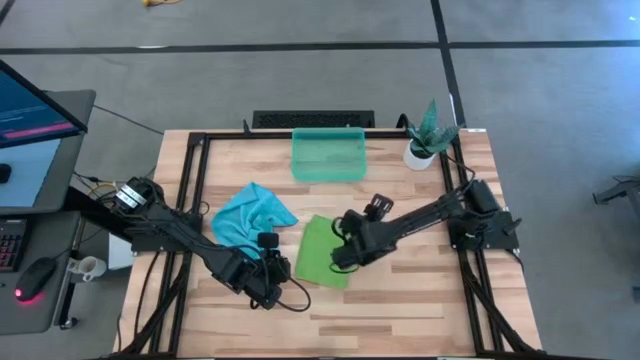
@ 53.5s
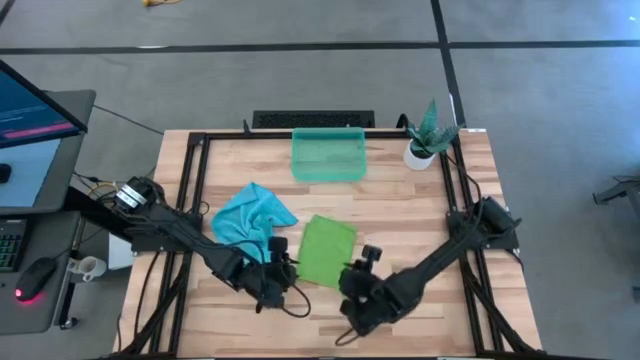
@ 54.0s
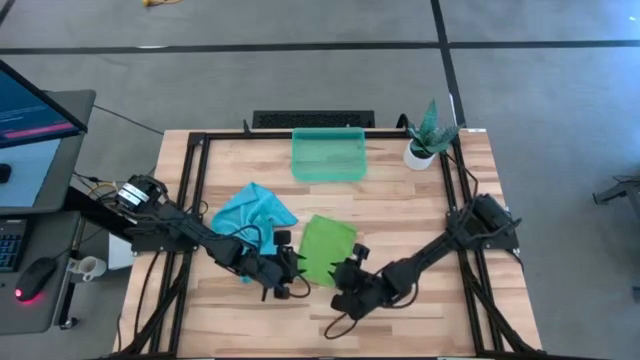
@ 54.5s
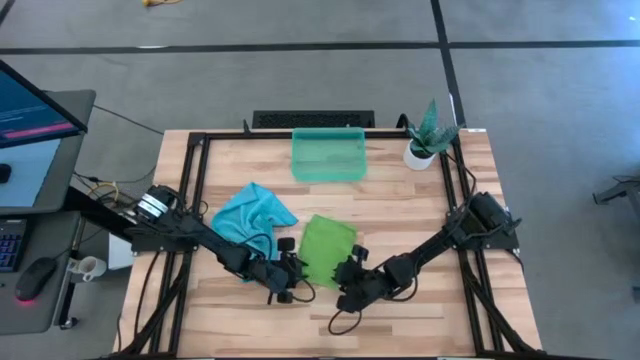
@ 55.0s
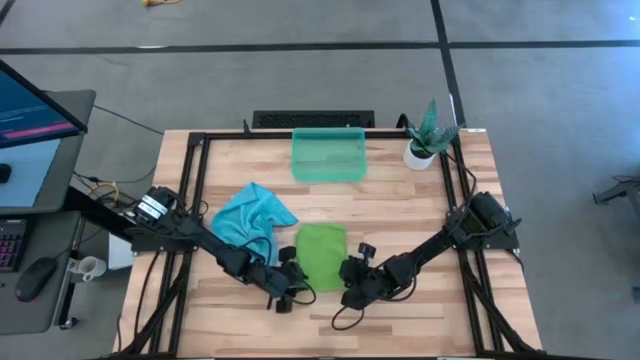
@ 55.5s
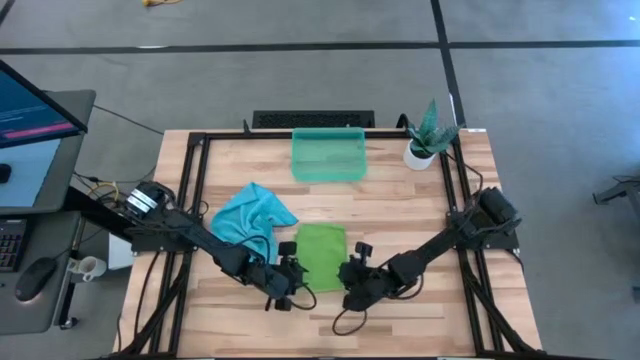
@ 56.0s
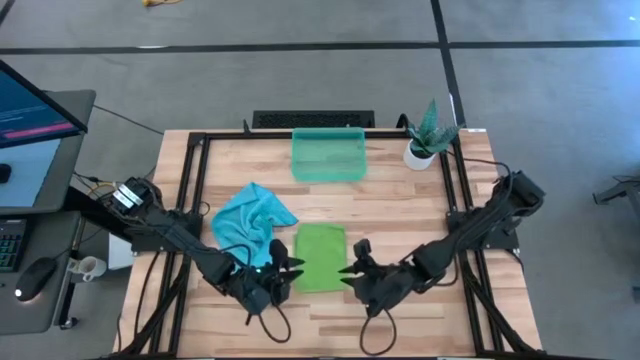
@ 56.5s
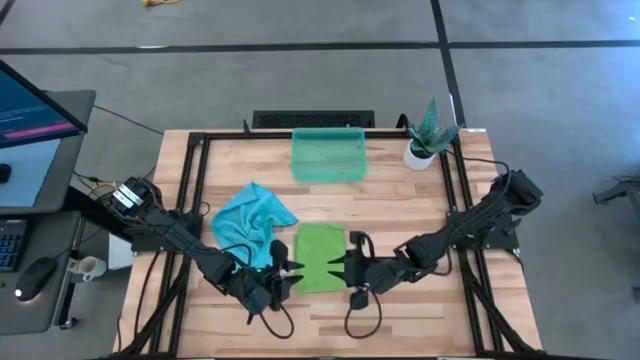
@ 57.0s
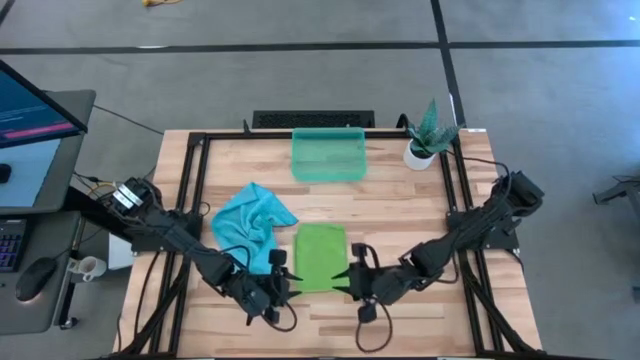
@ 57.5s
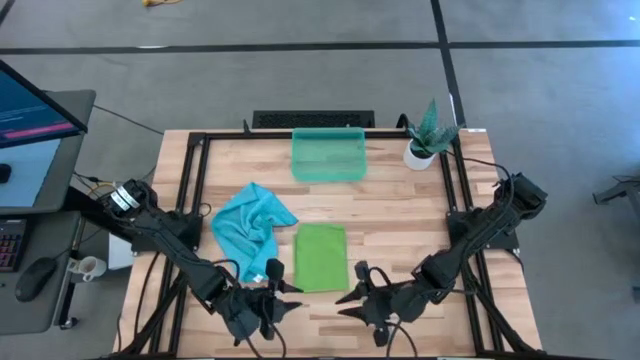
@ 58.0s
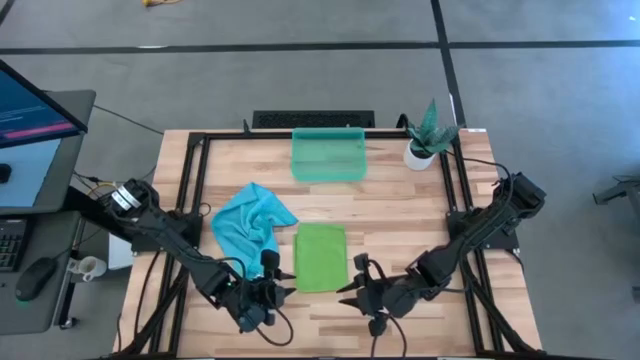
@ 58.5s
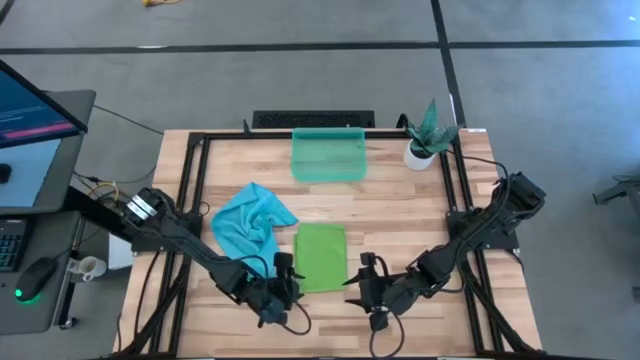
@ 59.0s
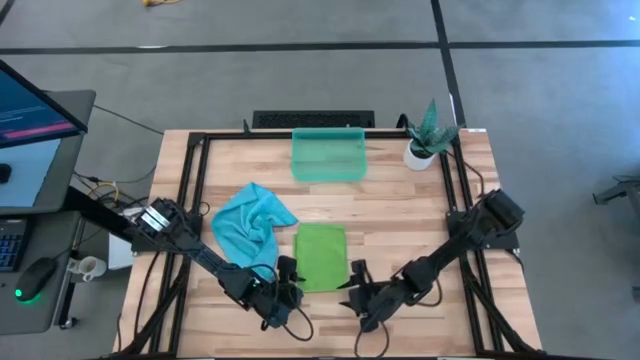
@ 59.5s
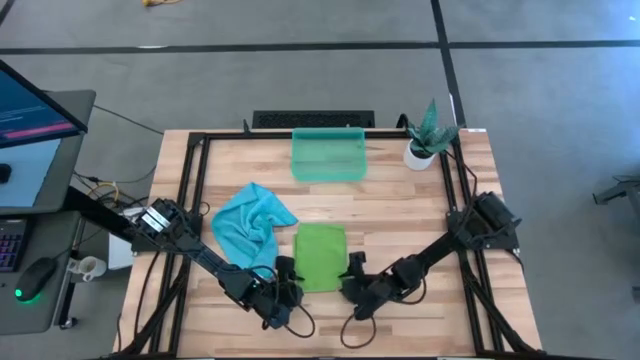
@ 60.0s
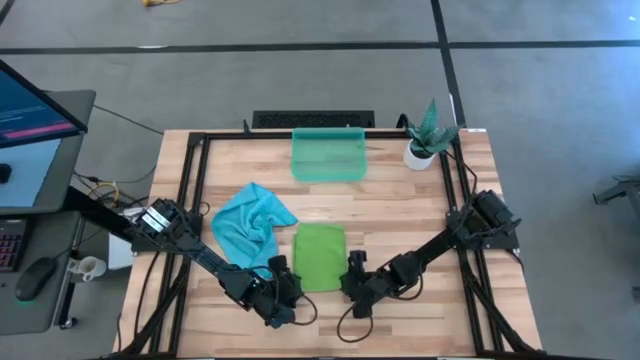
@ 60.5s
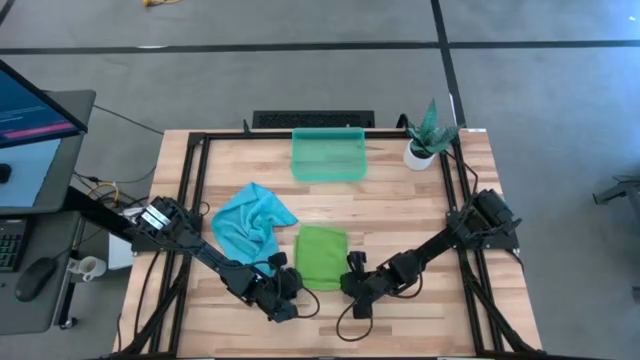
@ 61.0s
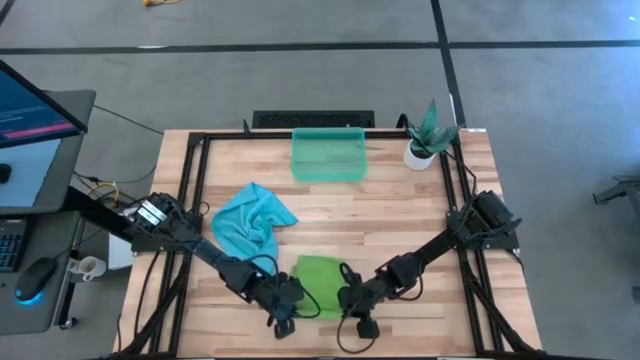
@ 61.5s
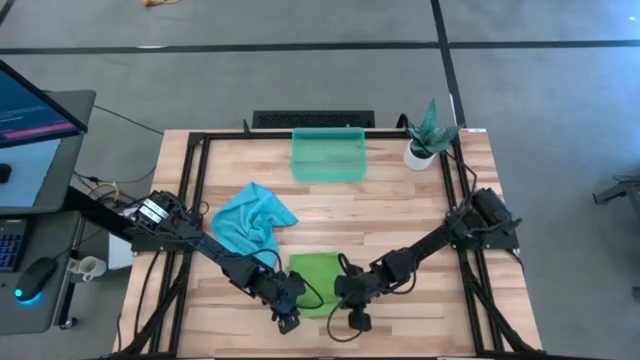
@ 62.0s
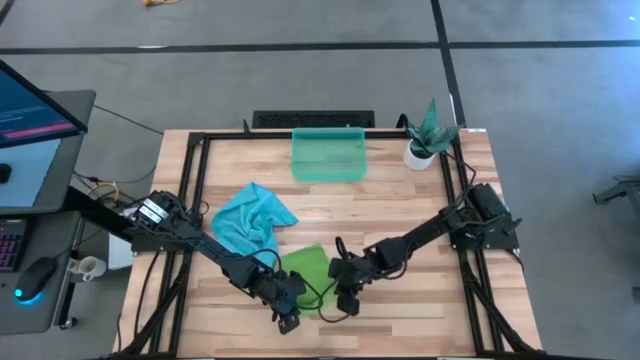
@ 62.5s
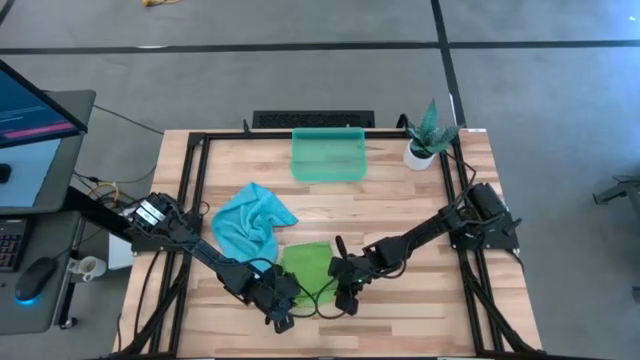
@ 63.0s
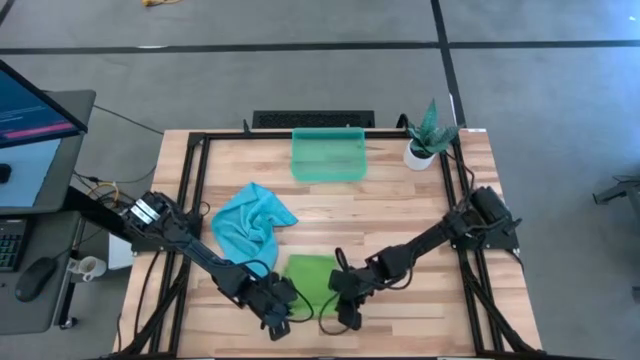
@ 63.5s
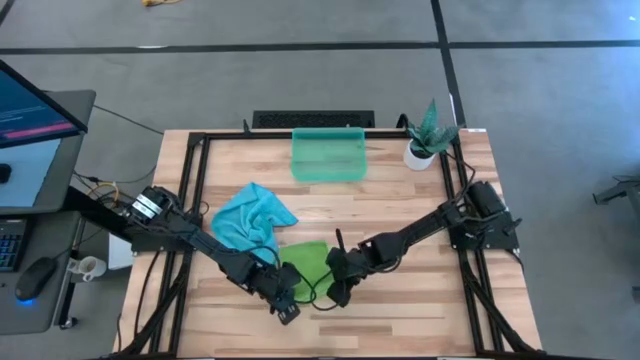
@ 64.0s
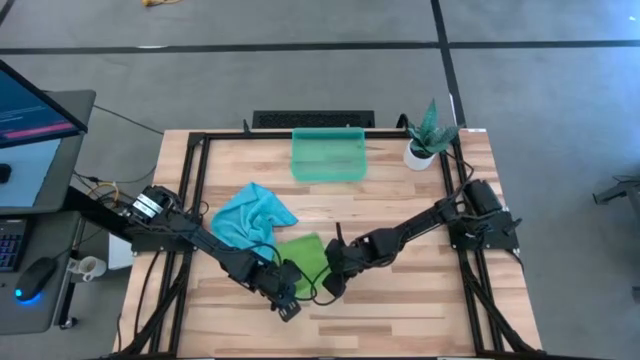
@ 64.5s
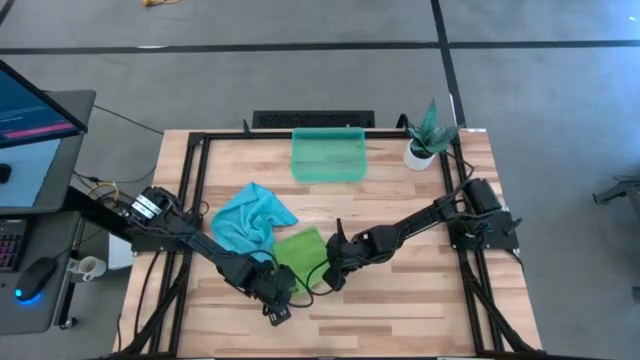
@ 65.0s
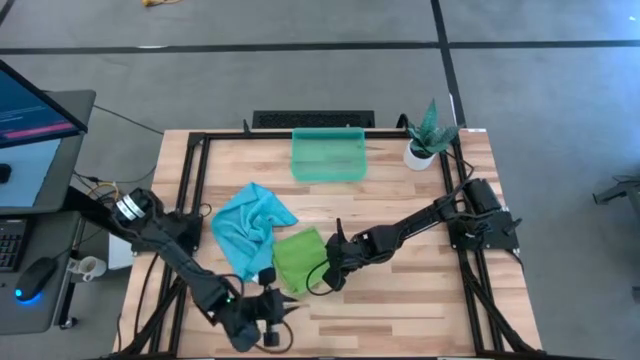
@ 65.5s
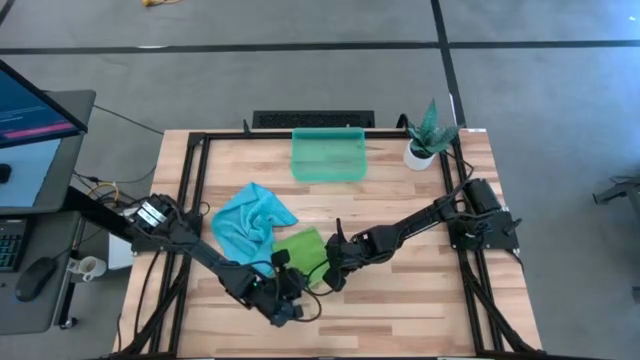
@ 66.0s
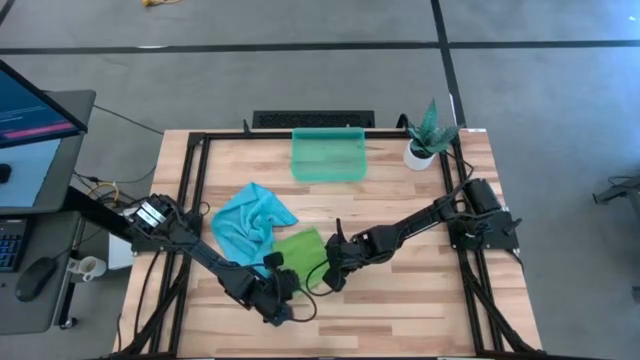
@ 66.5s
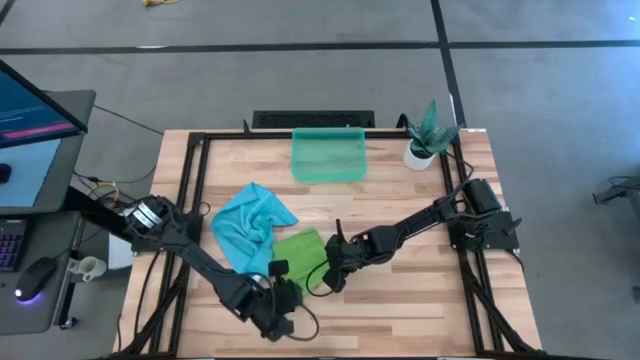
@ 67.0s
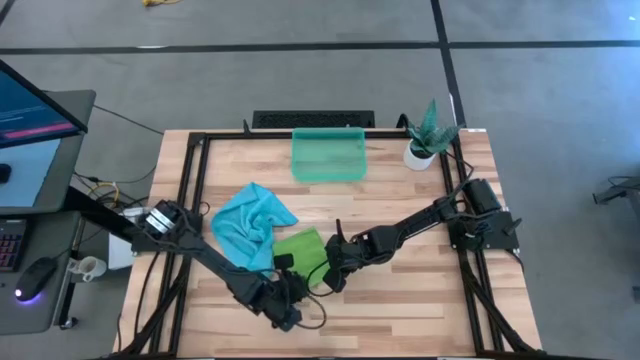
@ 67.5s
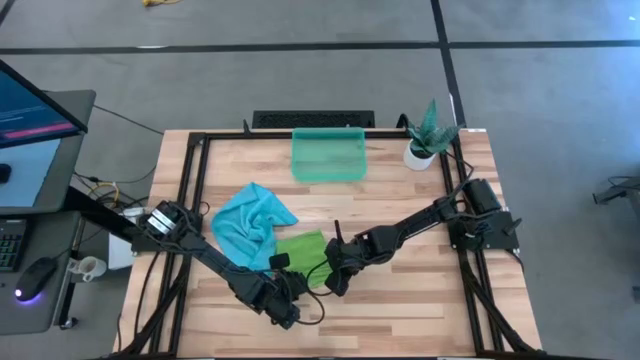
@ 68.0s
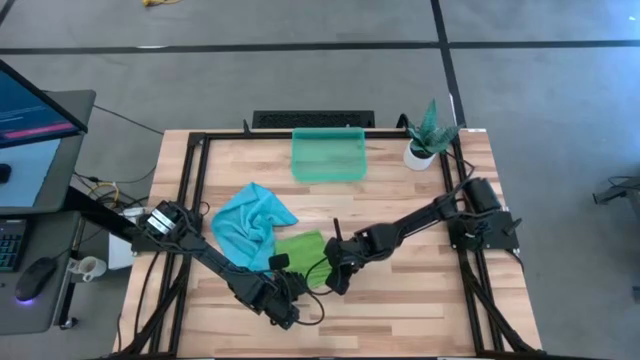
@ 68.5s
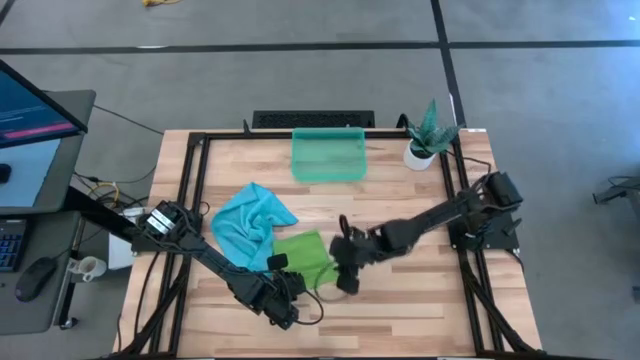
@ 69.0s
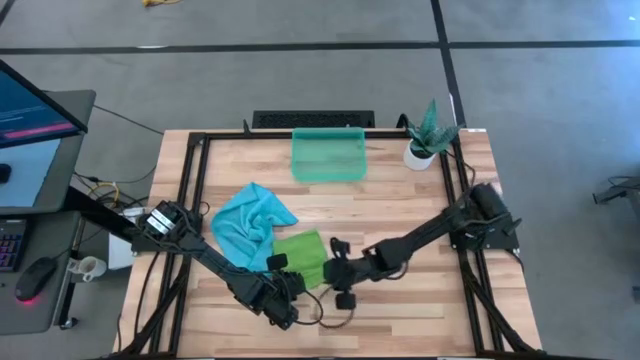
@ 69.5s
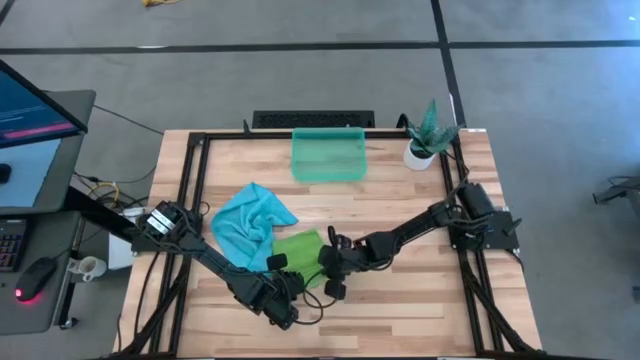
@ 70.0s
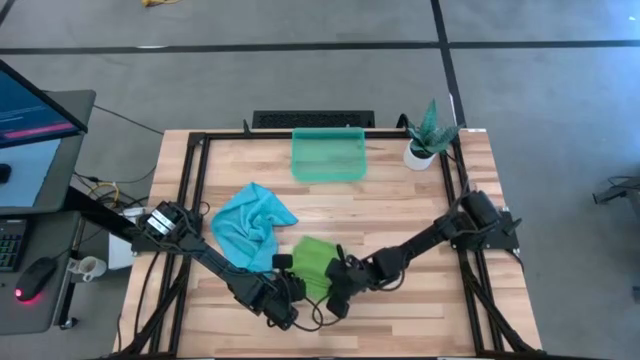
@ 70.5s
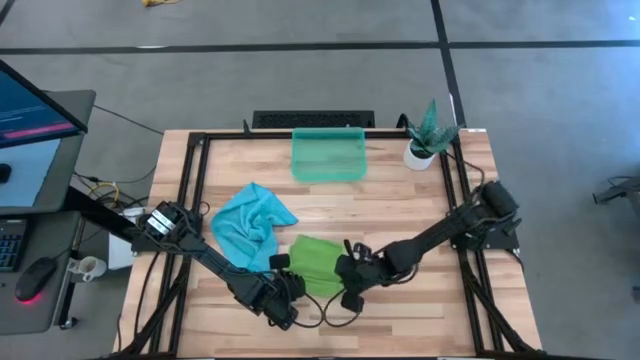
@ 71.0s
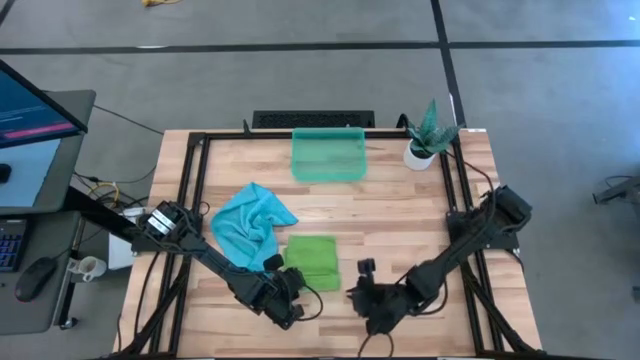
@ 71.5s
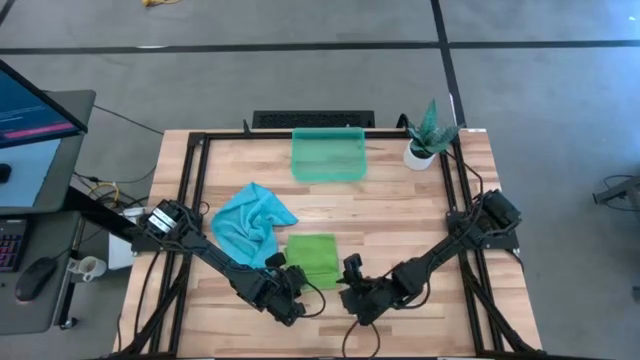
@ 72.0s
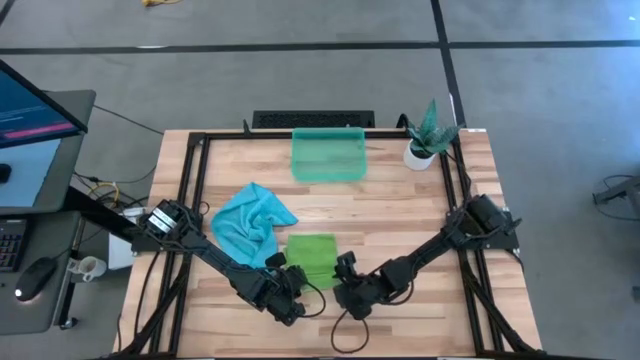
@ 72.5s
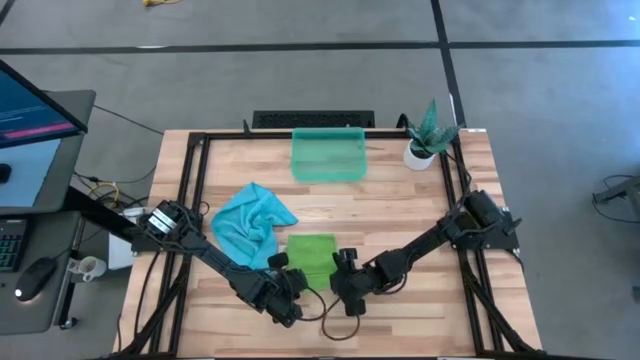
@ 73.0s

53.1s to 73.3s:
Task: Roll microfiber towels into tight, uniform cylinder then place into a basket
Roll the green microfiber cloth

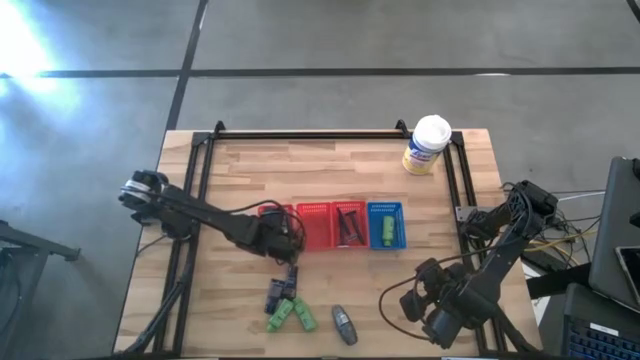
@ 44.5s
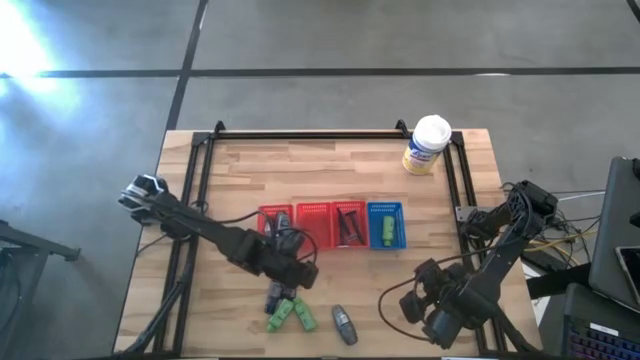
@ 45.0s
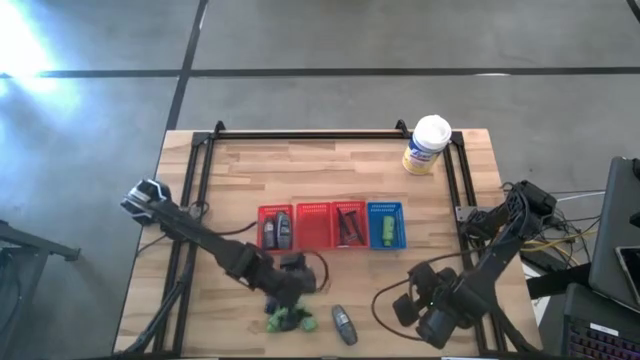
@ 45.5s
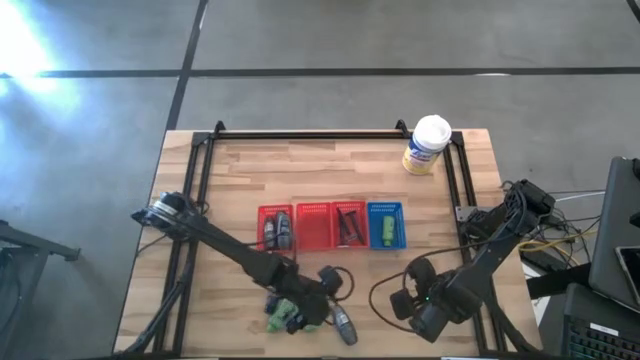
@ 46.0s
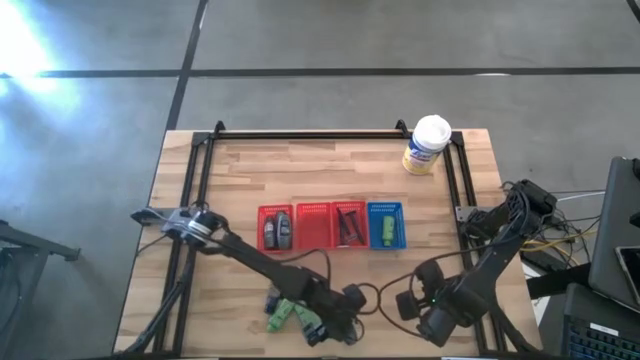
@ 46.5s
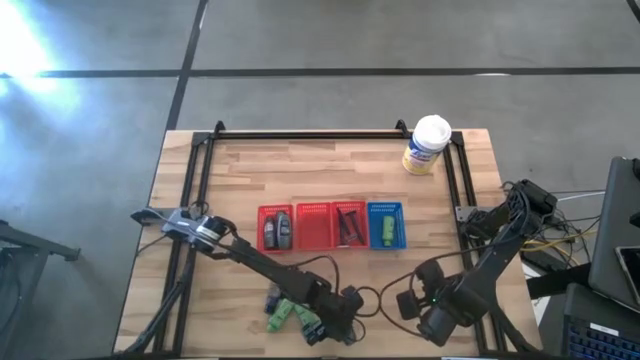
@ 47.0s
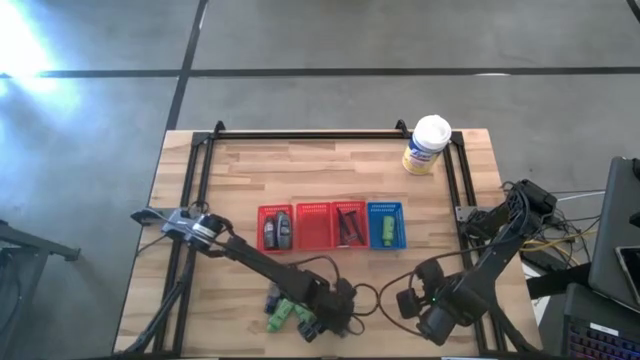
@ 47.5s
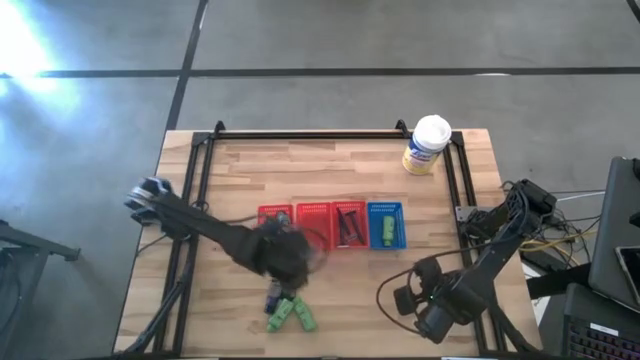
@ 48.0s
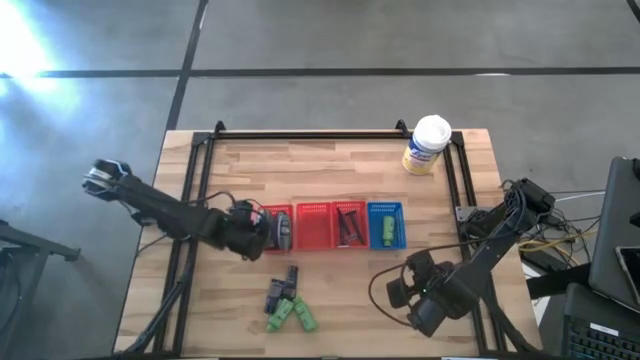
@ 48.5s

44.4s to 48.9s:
Task: Pick & Place Travel size toiletries
Put the gray deodorant into the left red bin
